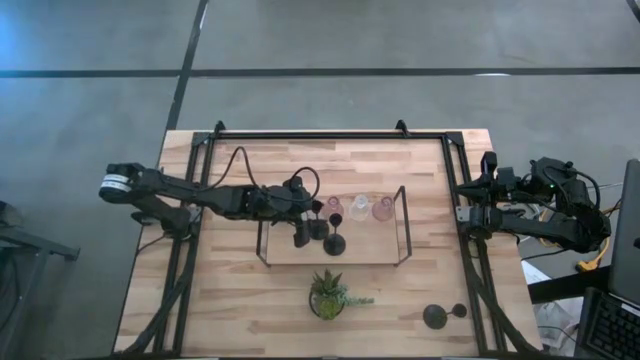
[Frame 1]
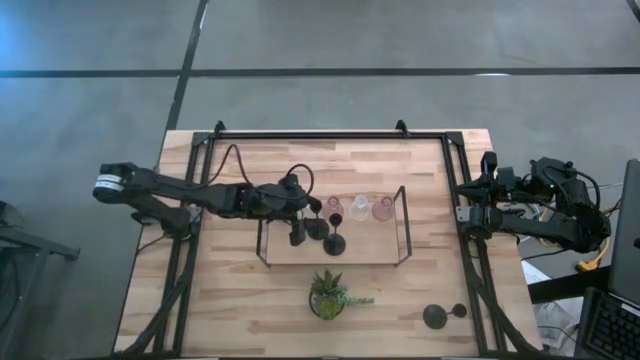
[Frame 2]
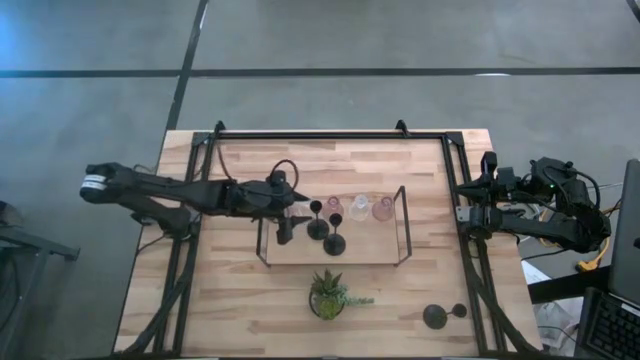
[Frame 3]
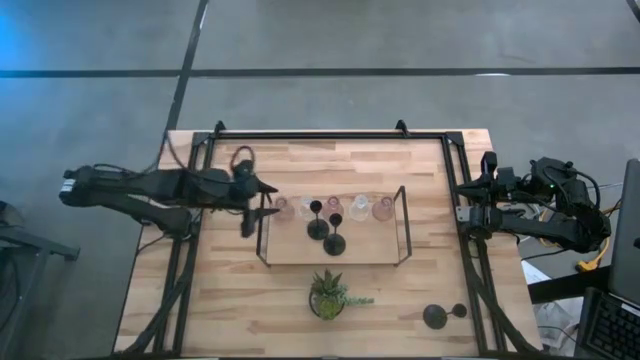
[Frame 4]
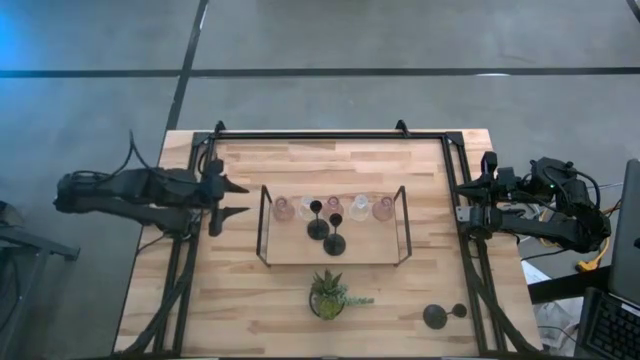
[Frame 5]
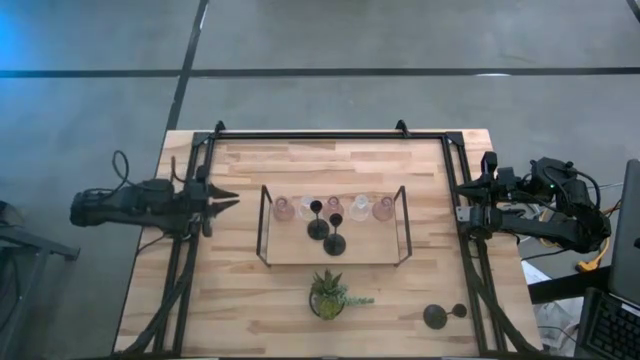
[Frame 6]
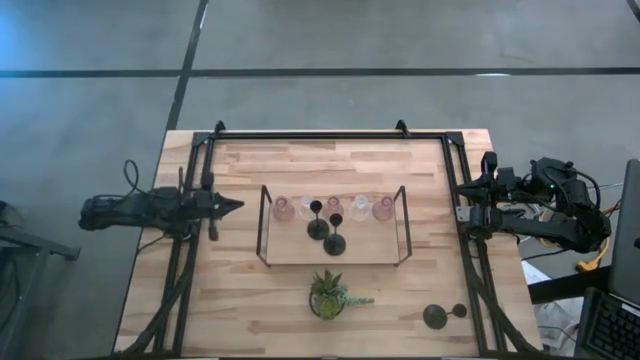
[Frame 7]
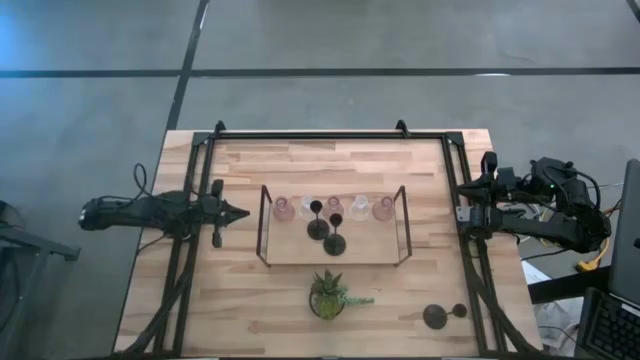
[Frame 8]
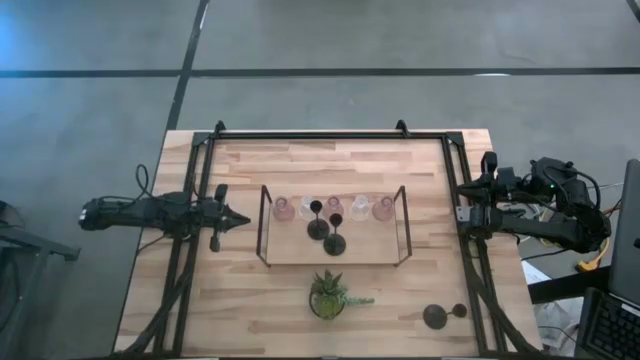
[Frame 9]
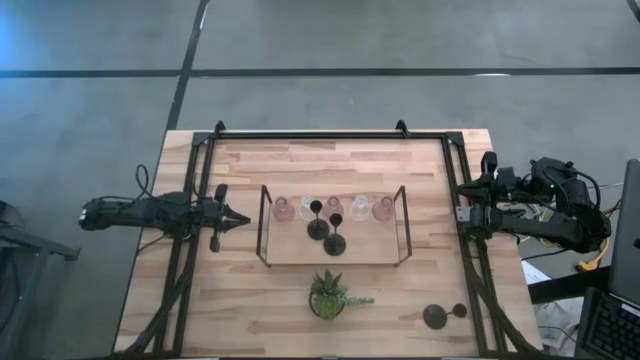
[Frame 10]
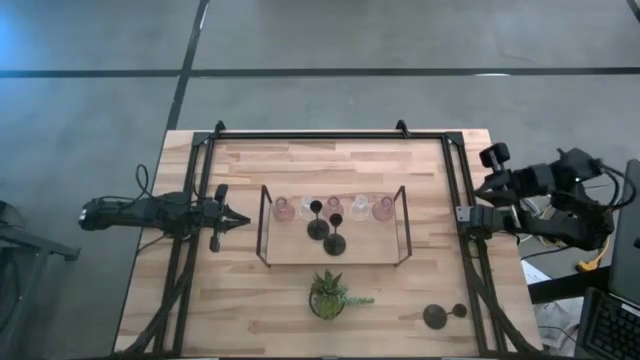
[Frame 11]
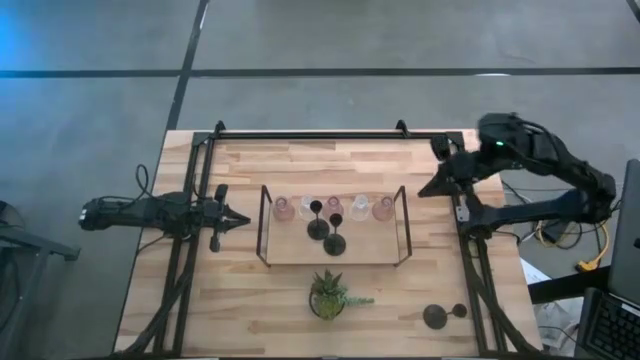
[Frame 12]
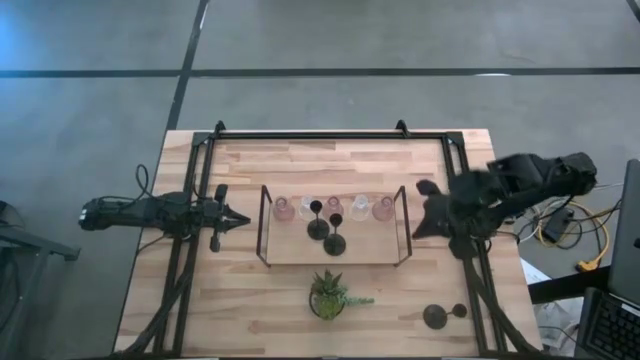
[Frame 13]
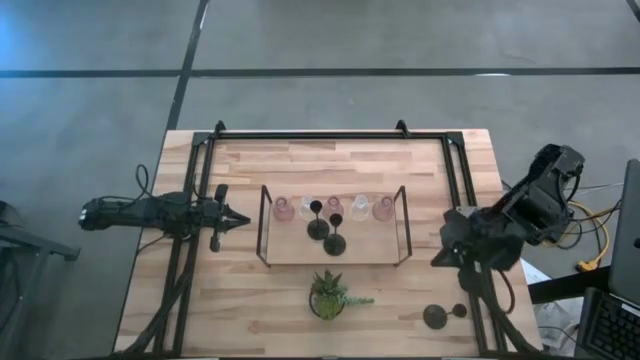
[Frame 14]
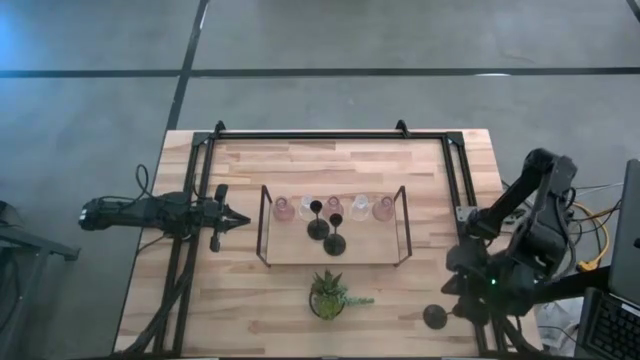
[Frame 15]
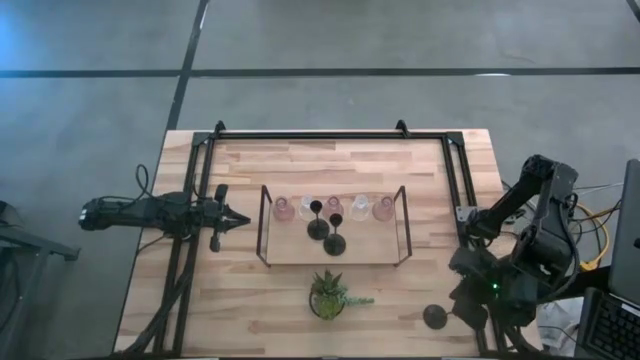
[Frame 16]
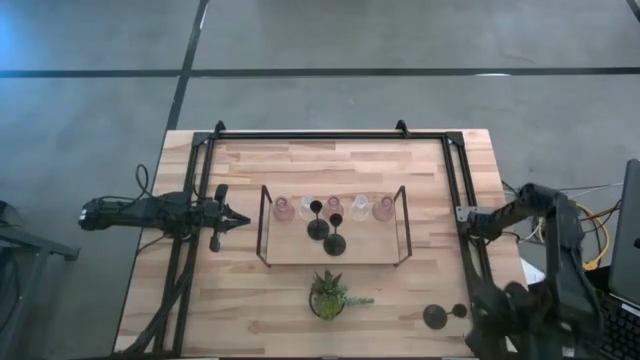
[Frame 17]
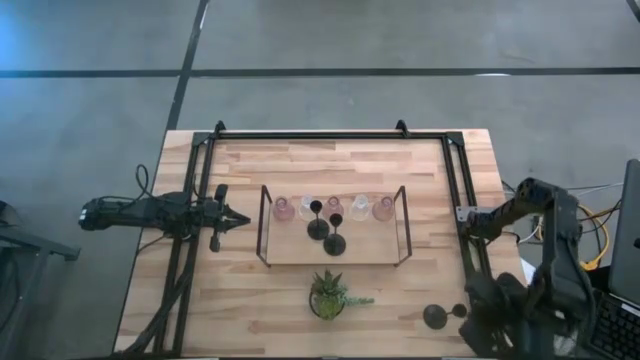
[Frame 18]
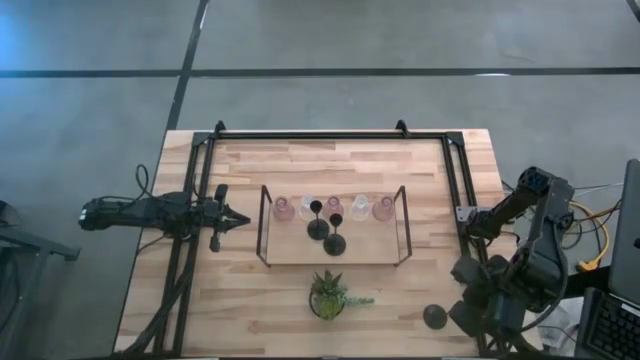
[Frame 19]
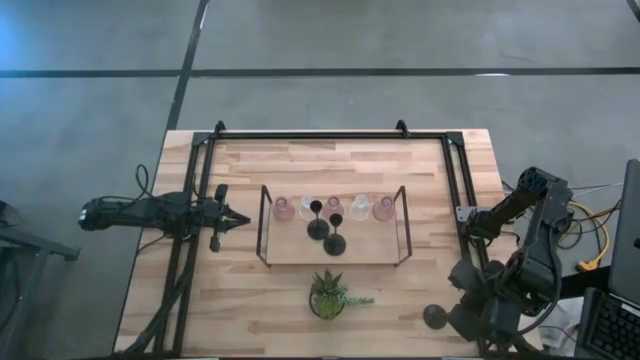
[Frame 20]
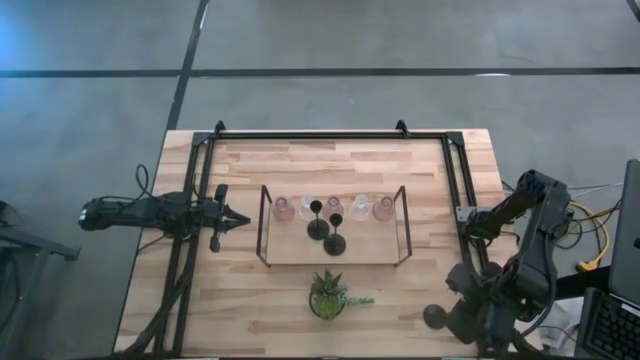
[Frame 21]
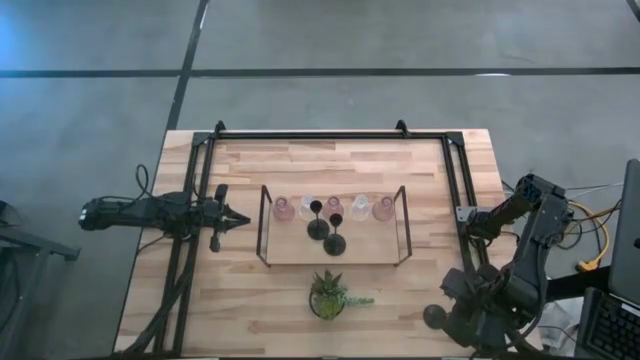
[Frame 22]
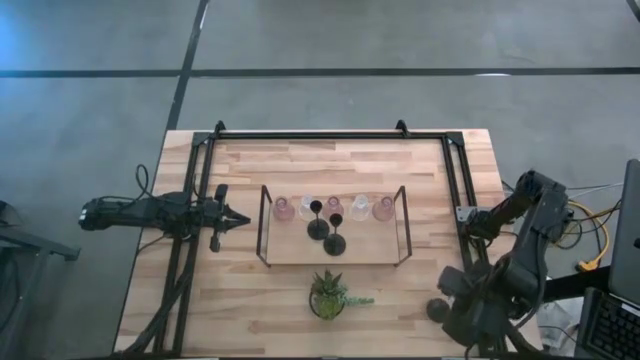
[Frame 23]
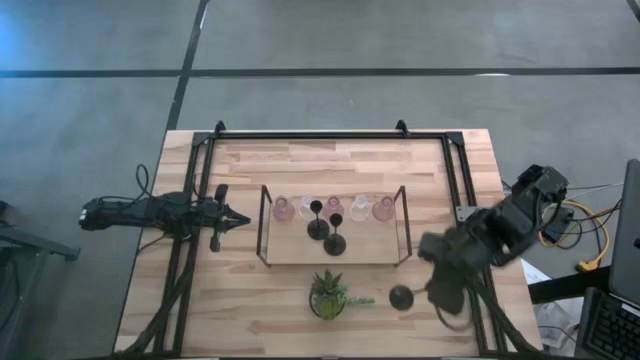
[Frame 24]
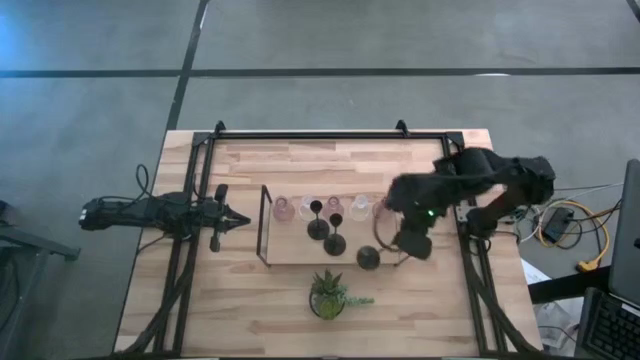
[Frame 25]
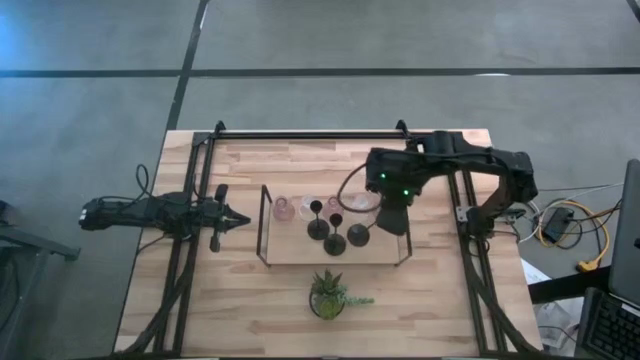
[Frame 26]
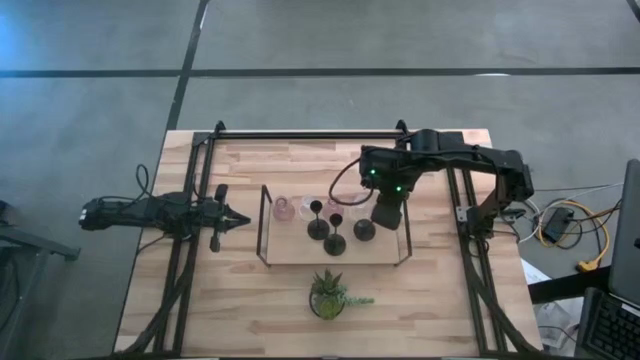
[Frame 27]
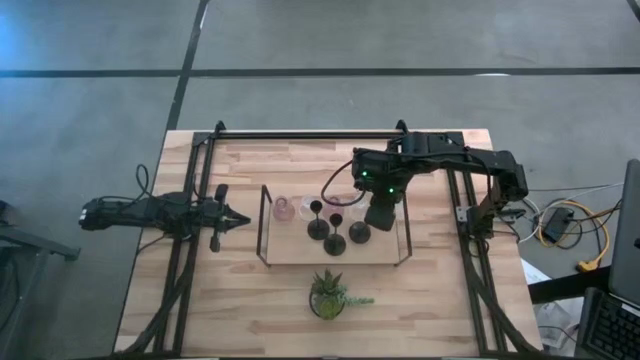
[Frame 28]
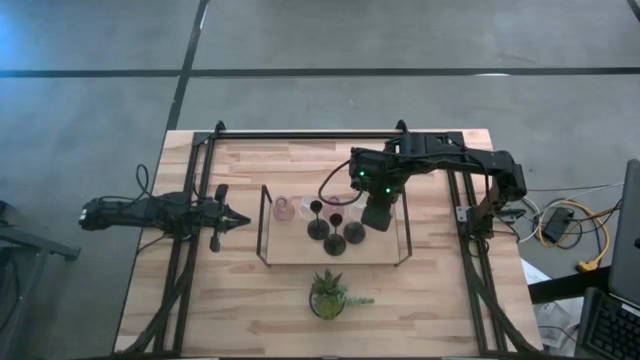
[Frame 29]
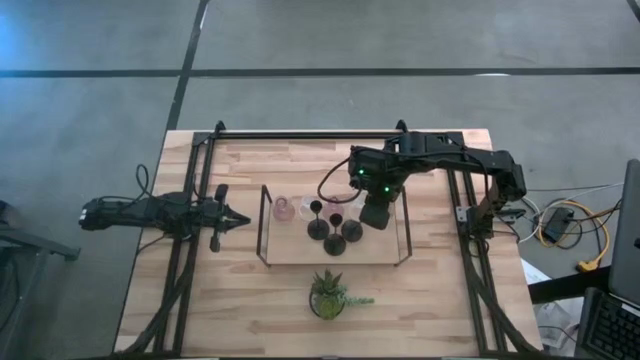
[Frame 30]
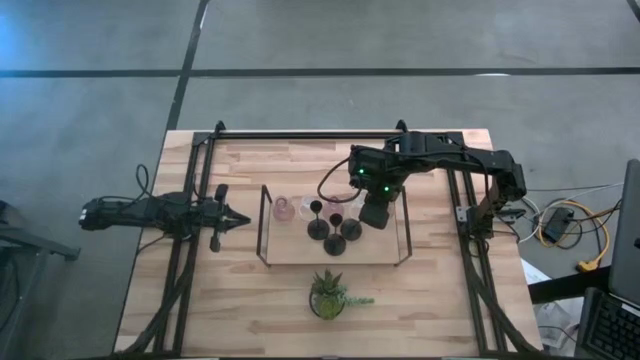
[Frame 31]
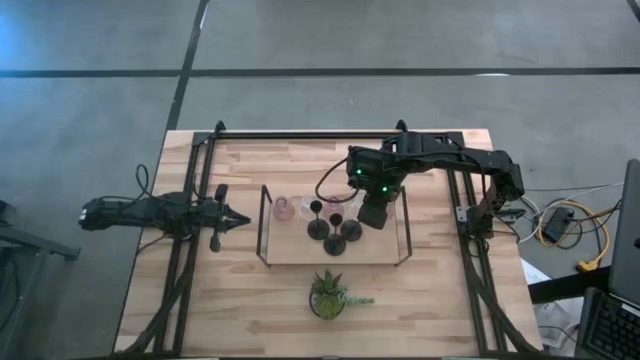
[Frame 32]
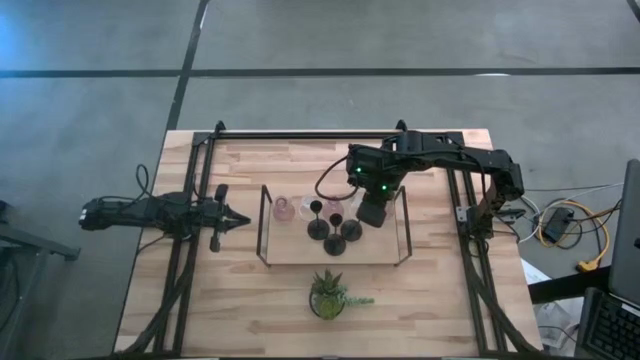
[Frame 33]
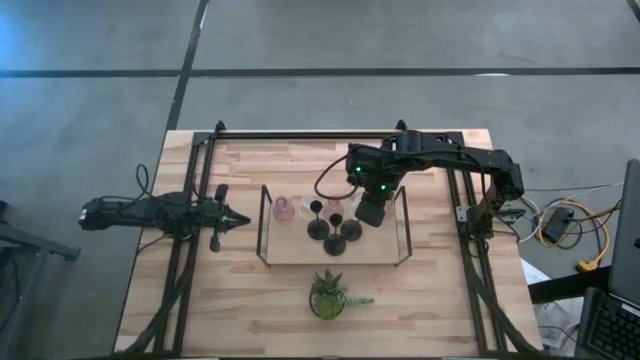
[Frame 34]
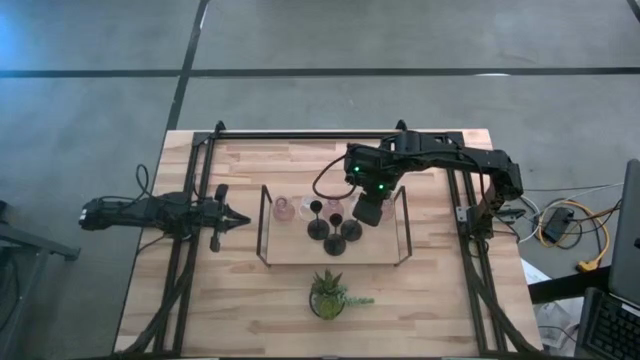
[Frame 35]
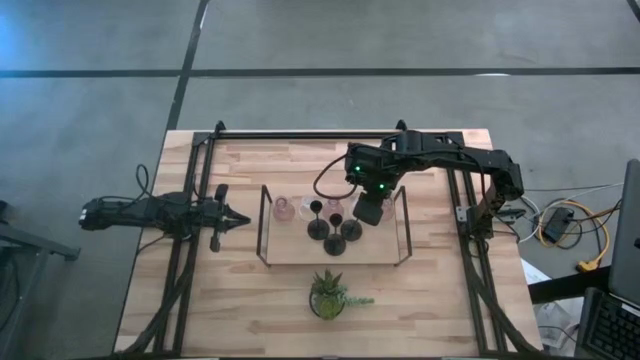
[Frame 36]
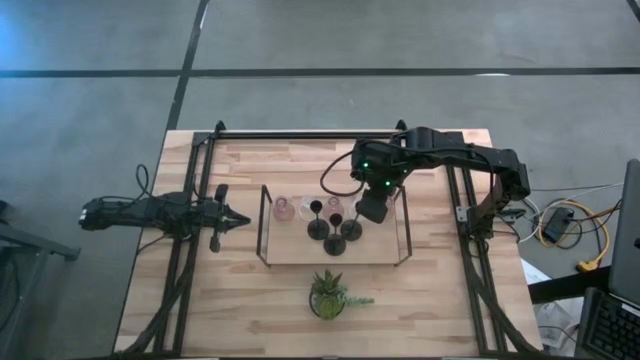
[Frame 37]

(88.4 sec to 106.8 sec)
Task: Pick & Place candle stick holders
Put the black candle holder on the shelf

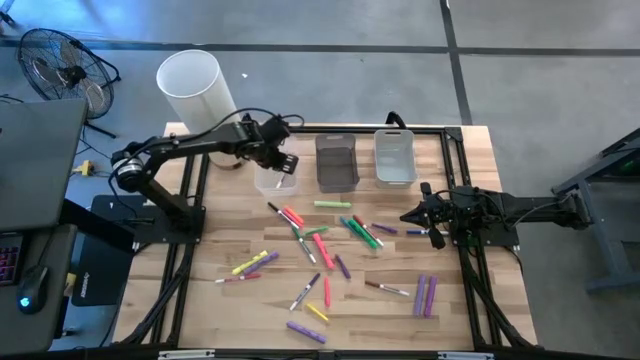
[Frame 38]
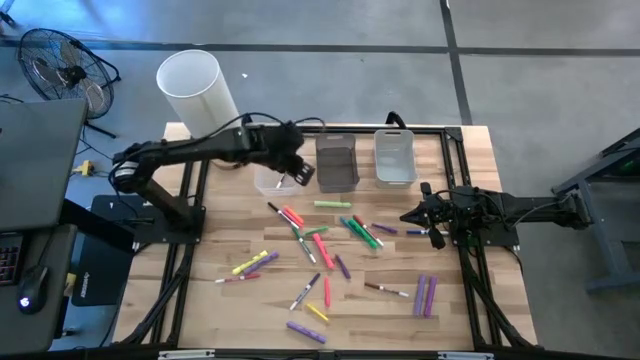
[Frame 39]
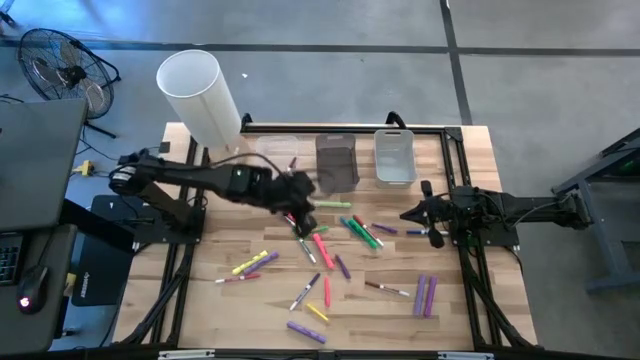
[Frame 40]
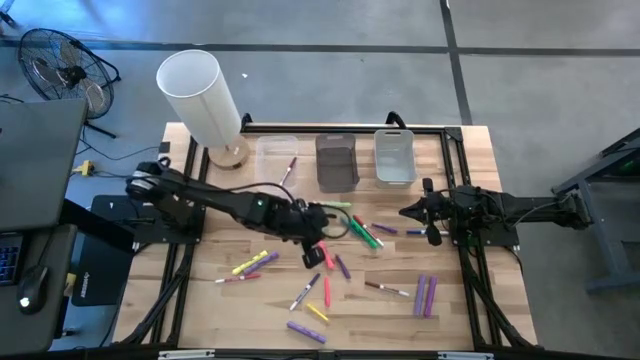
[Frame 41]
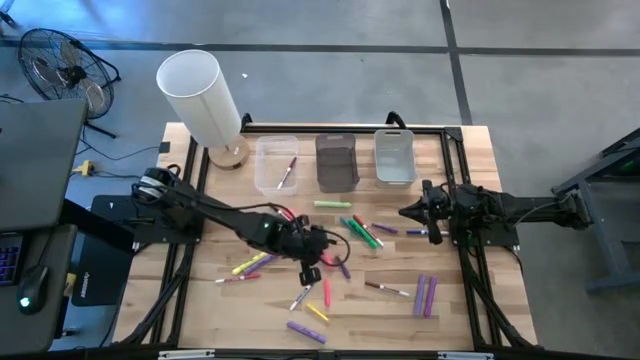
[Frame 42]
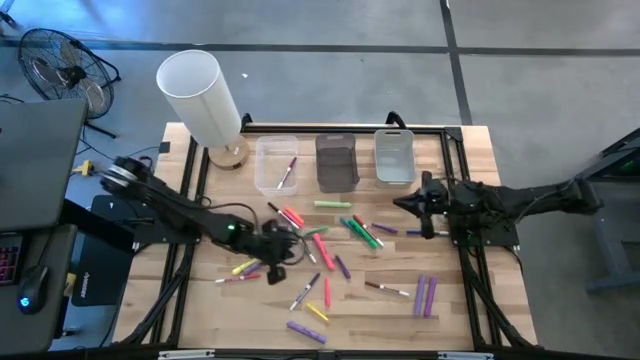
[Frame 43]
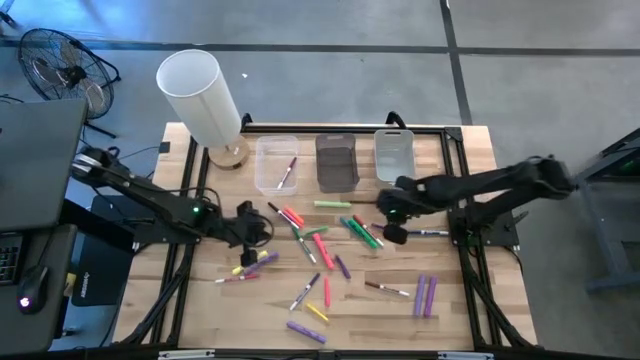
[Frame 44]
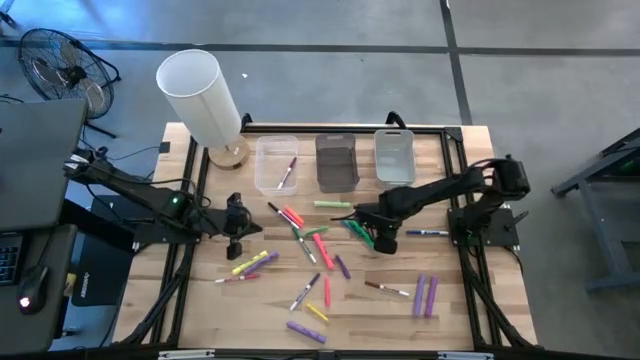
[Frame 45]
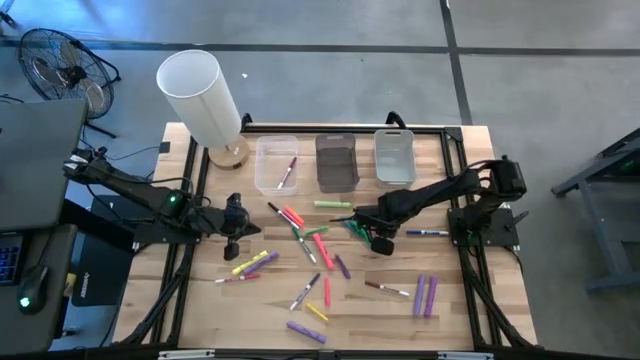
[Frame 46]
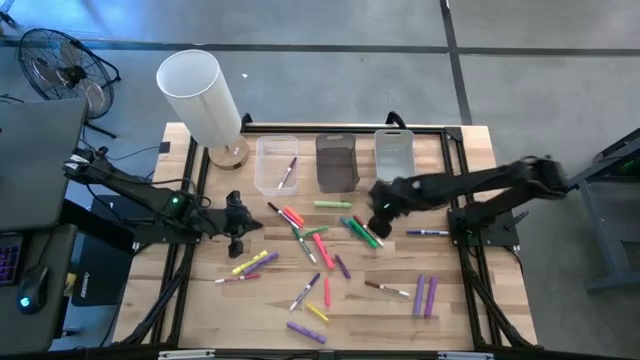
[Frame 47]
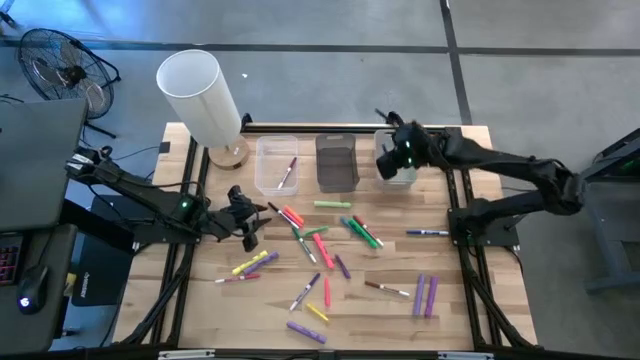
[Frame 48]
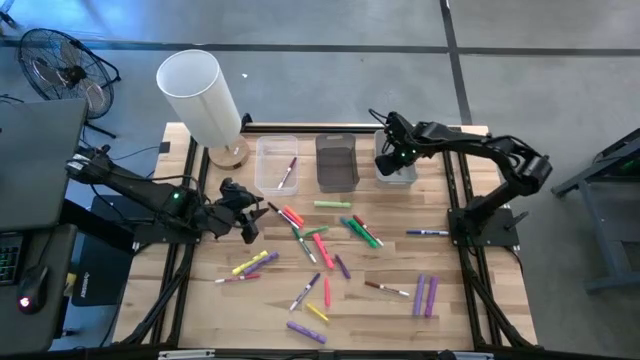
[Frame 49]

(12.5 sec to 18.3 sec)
Task: Pick & Place Markers
Put the top purple pen into the gray bin
